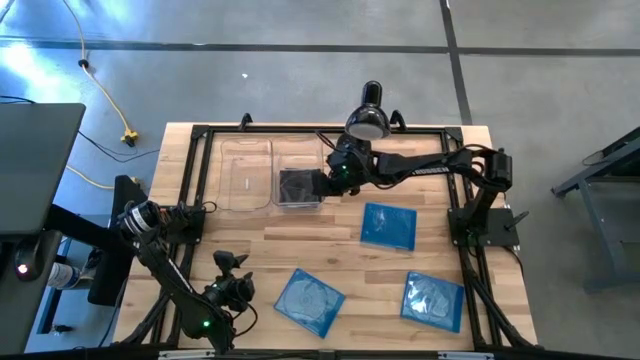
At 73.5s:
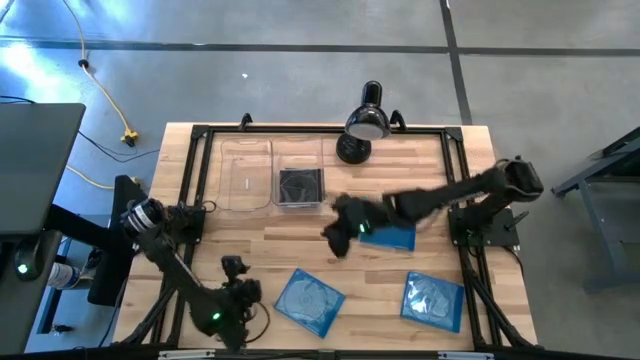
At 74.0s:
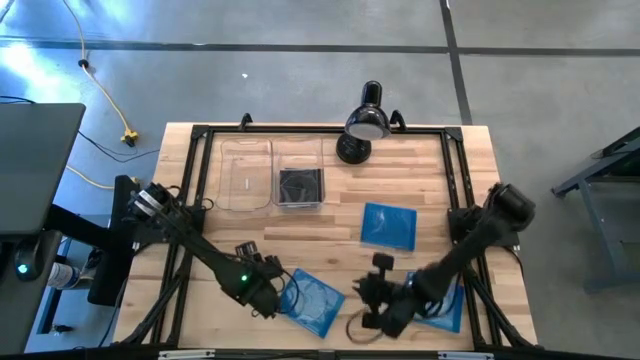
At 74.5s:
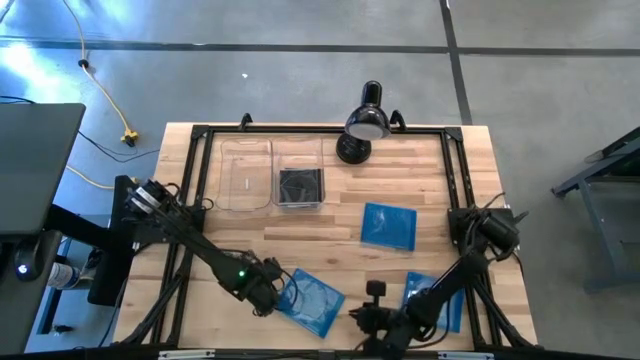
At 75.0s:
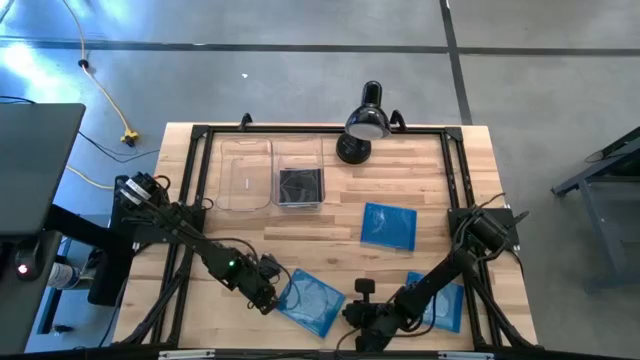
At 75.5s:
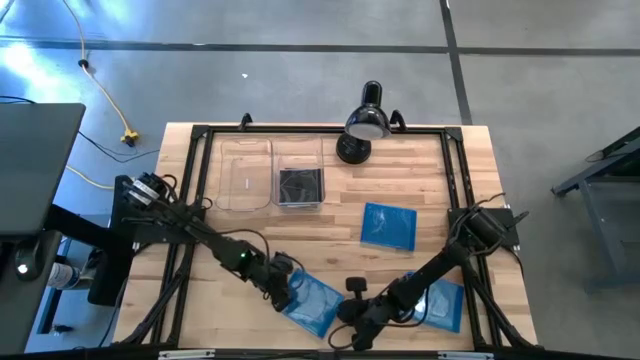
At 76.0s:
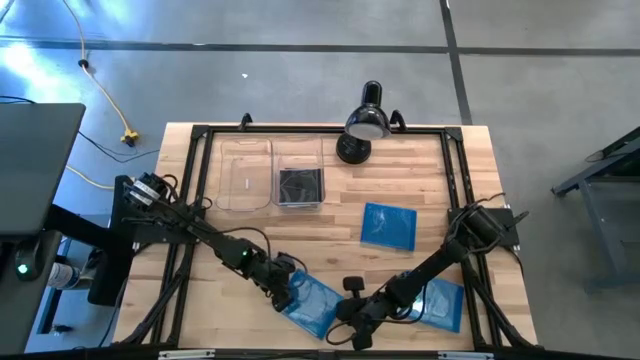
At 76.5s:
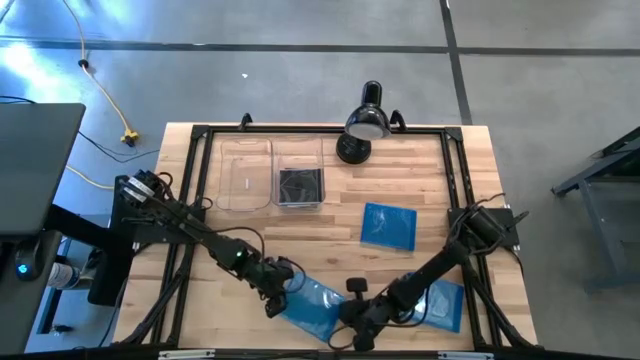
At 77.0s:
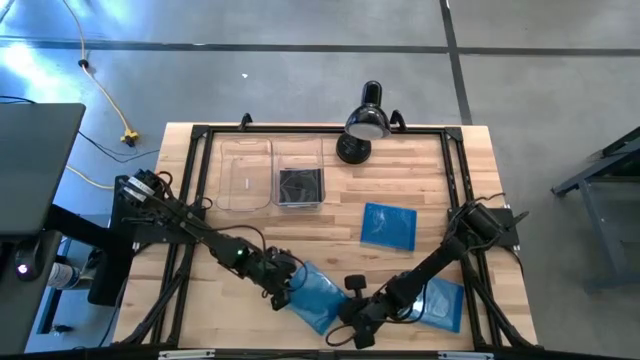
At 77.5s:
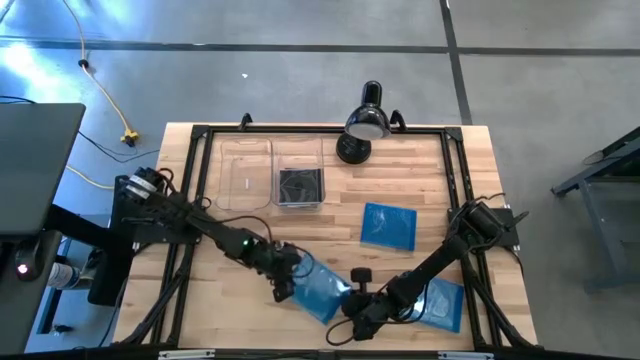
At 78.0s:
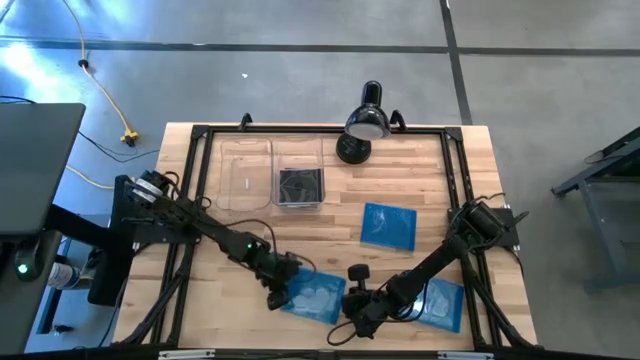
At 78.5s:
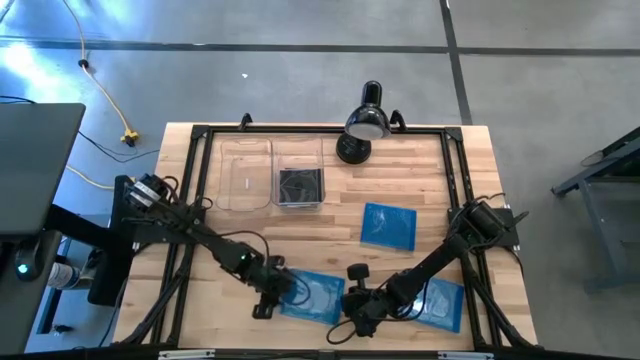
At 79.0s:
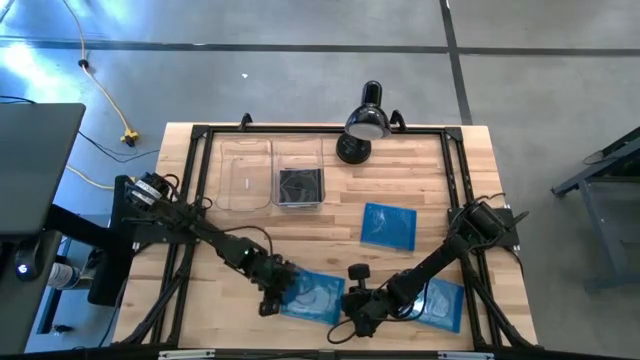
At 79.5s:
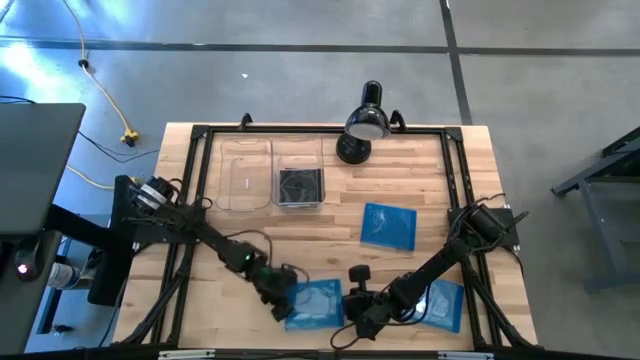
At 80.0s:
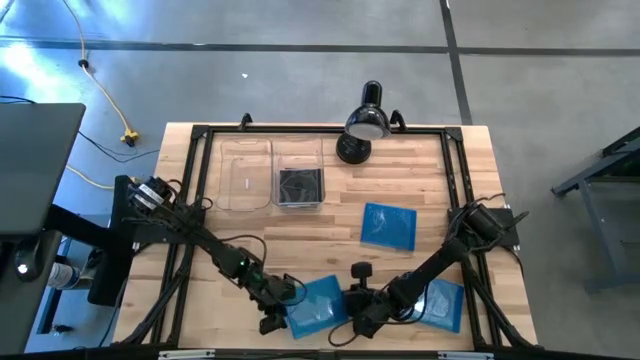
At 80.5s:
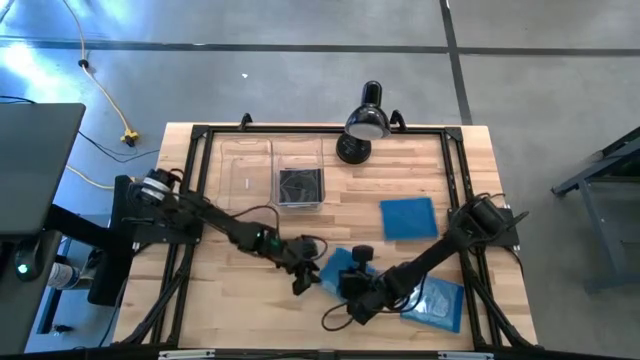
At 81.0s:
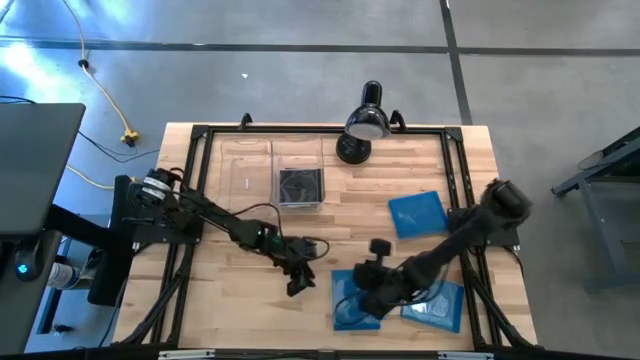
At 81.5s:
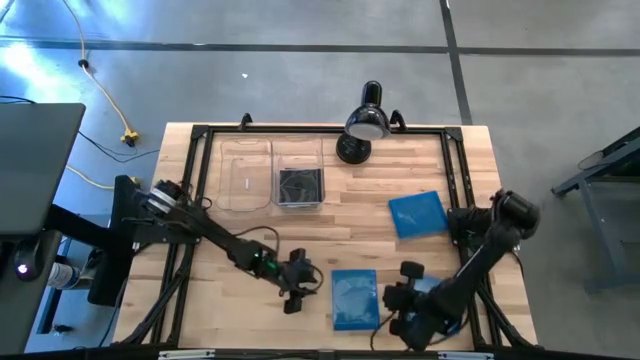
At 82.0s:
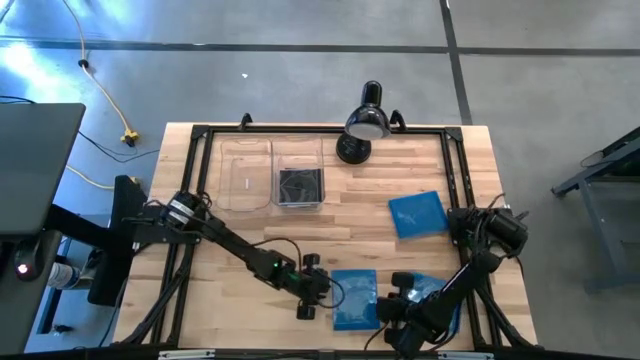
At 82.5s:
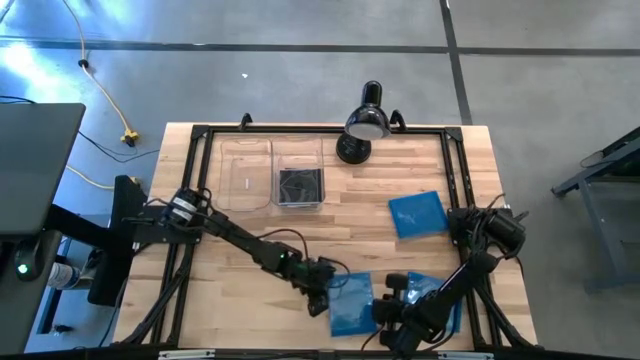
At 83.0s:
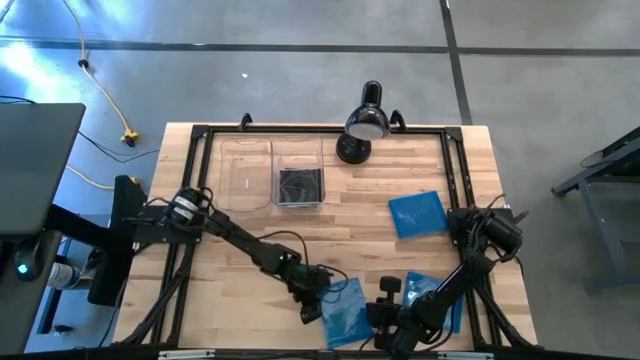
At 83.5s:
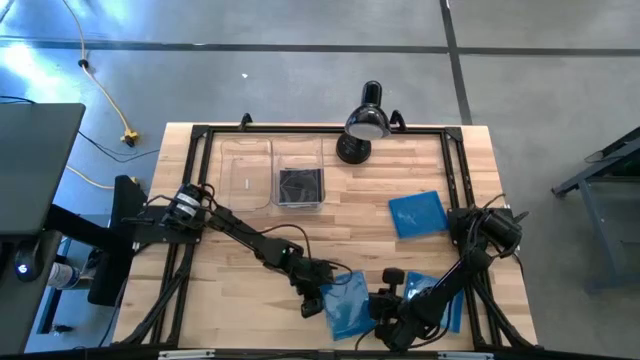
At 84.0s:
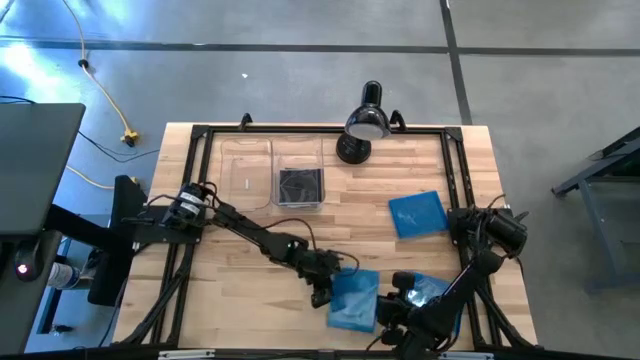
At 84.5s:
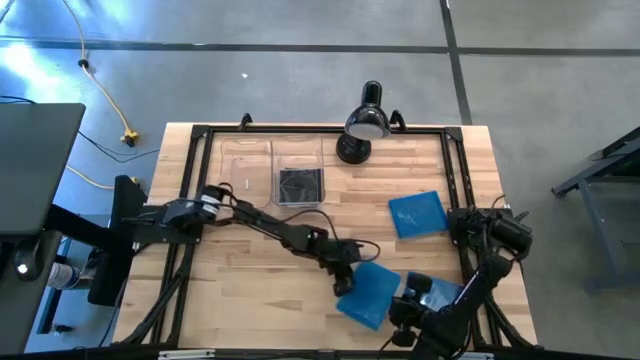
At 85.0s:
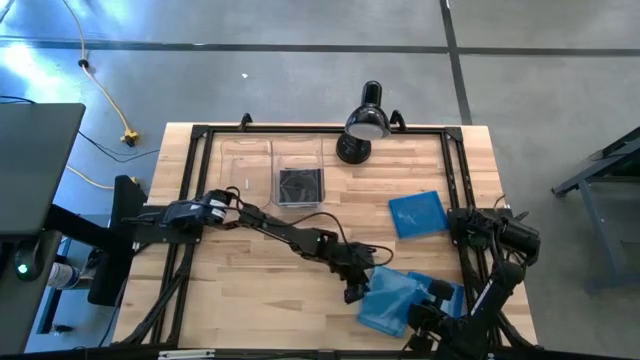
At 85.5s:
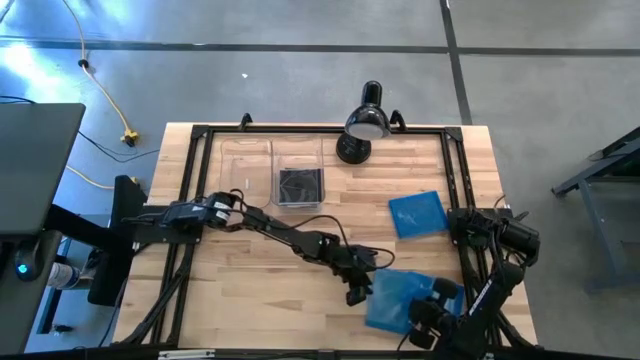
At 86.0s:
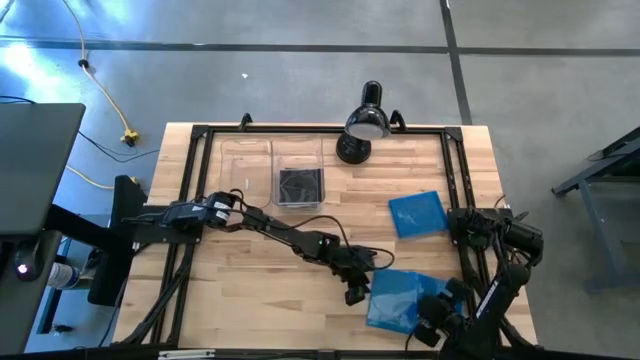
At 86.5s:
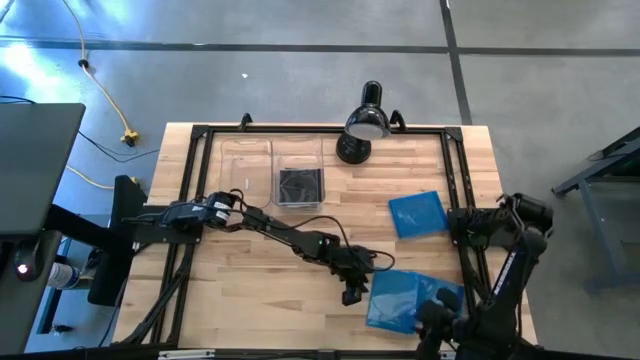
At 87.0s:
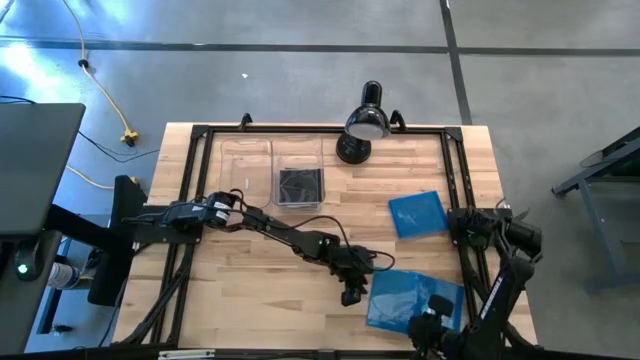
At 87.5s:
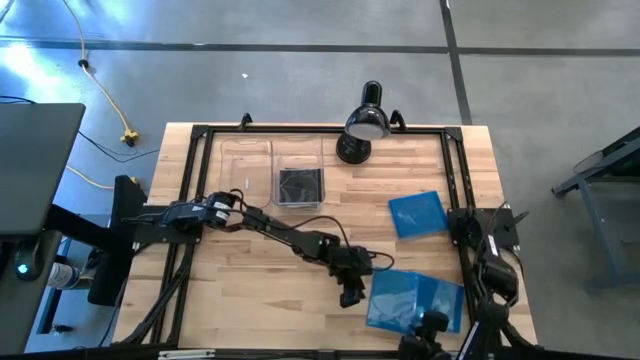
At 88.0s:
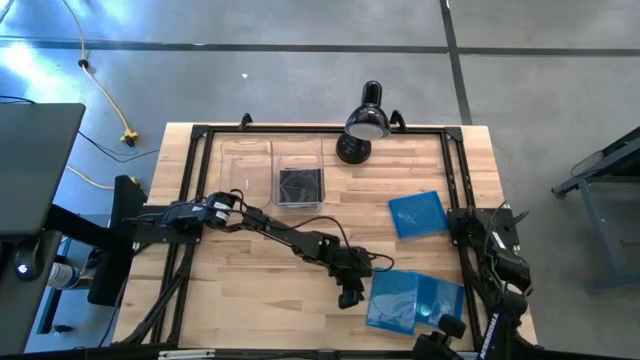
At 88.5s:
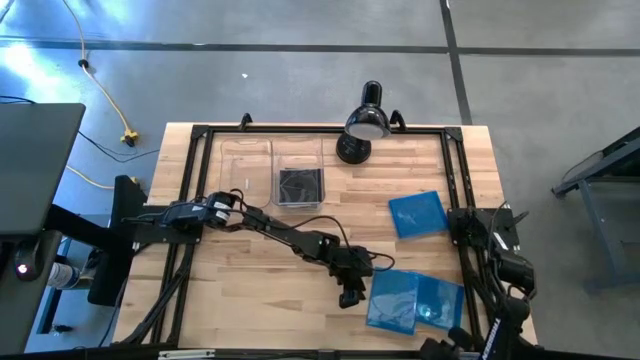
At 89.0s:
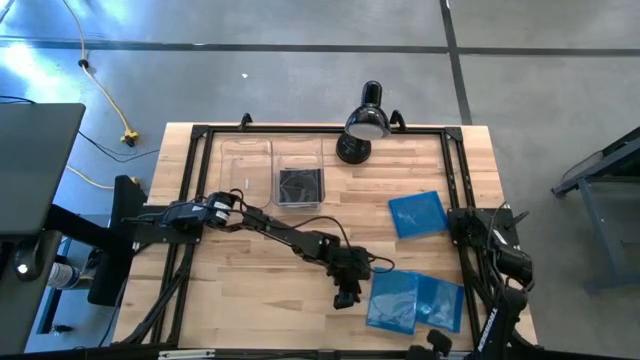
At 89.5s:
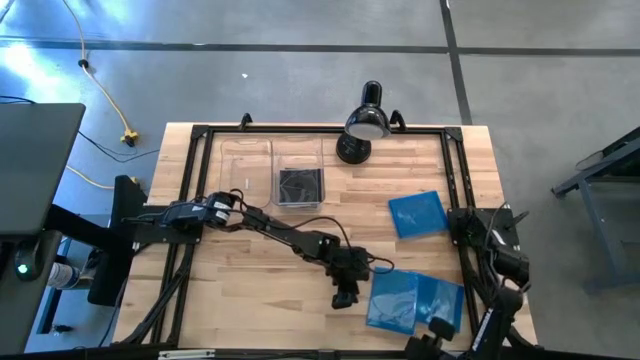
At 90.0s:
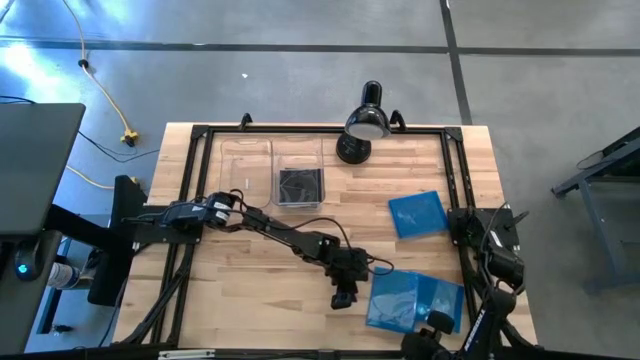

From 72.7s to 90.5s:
Task: Pick & place jewel cases by type
Put the left blue CD case into the left transparent bin

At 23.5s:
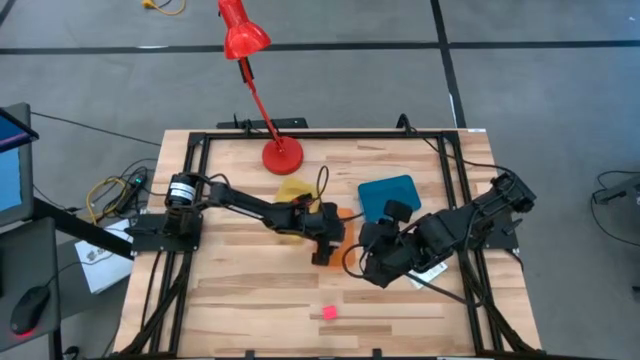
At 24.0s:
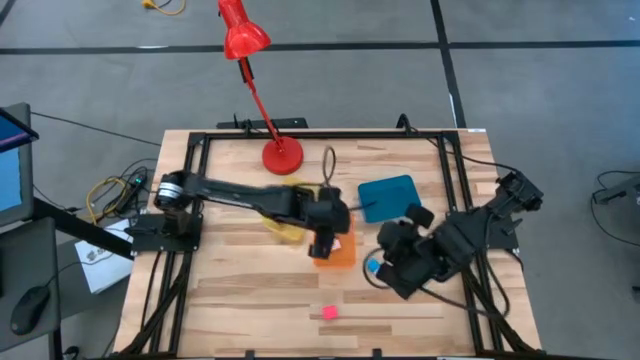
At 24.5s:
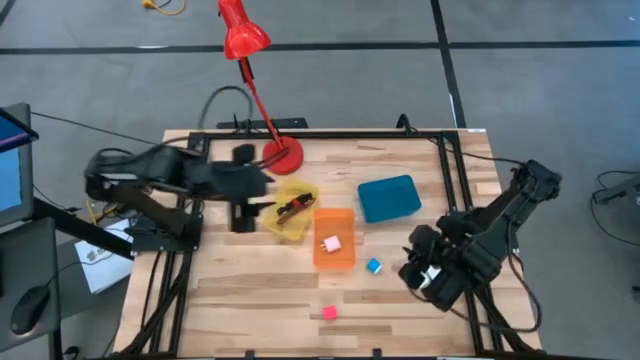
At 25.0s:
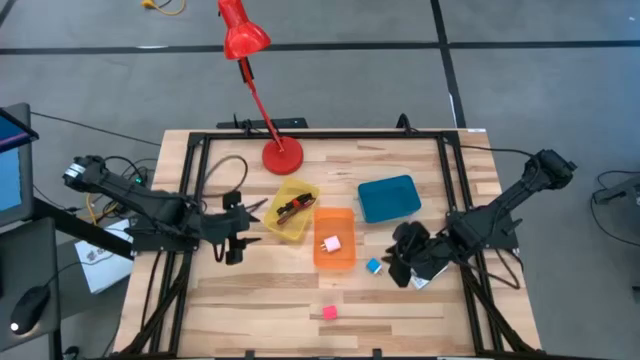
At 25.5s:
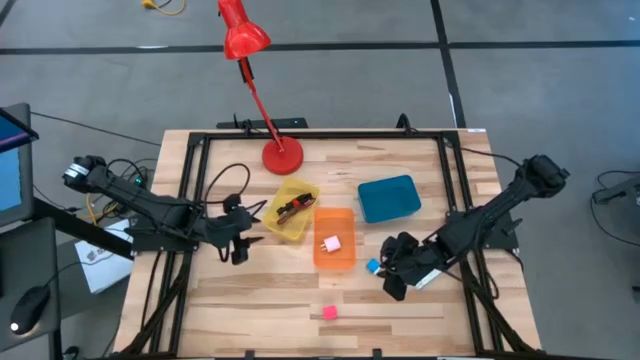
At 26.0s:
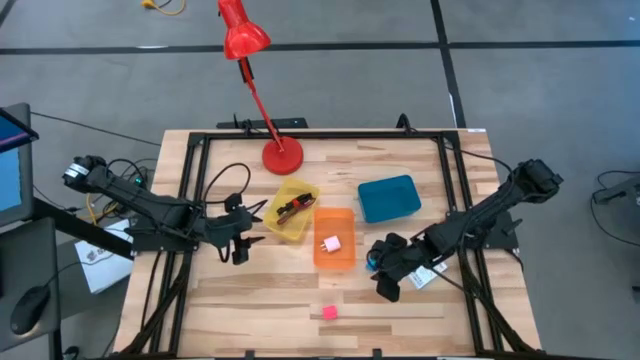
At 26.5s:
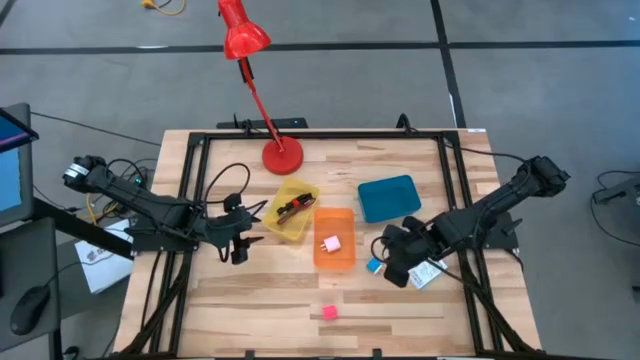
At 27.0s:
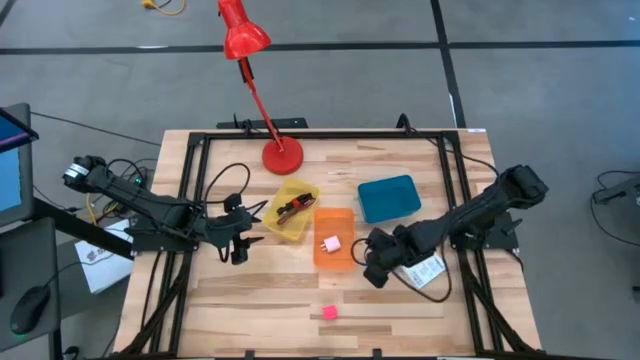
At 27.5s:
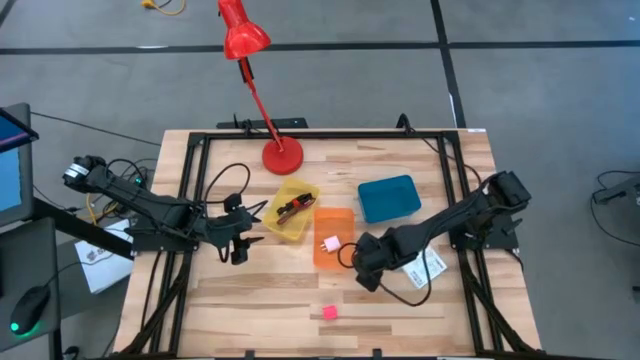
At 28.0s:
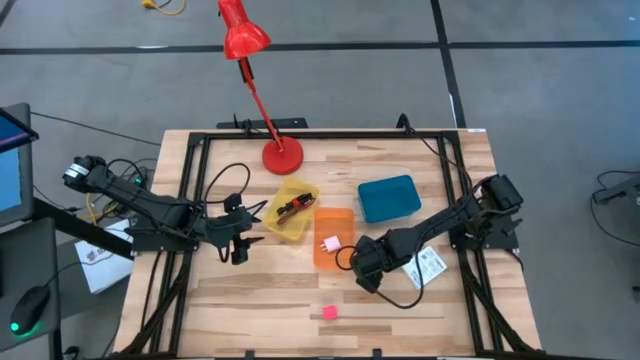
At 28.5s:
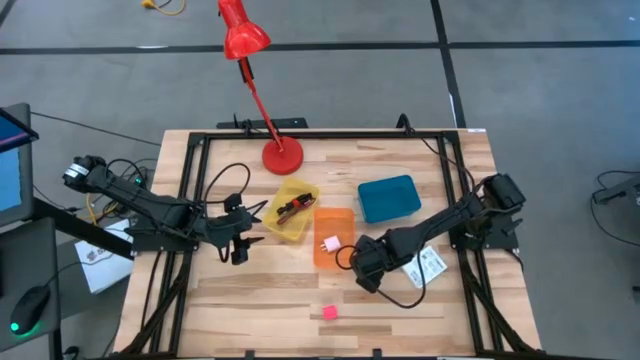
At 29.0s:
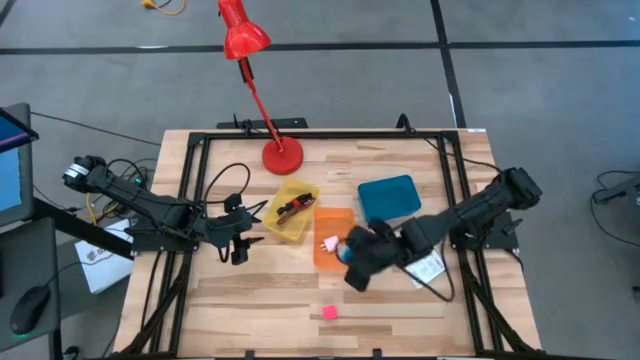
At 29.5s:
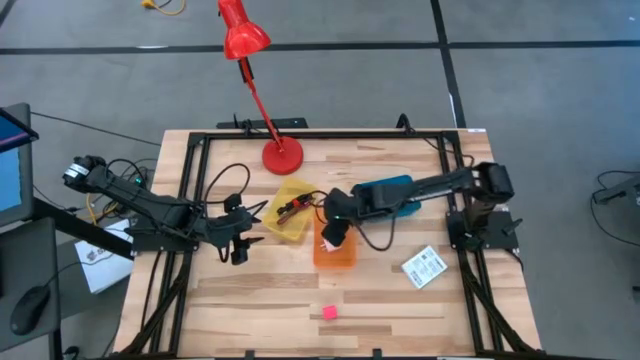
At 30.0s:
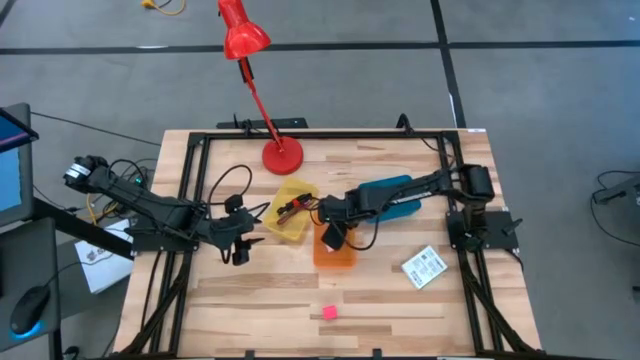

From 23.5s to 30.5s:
Task: Pick and place items into bin
Put the blue charger adapter into the orange bin
